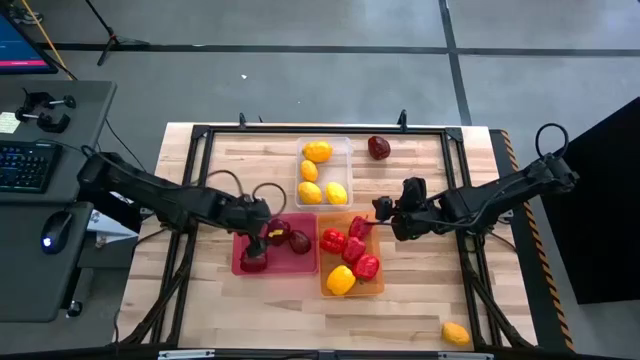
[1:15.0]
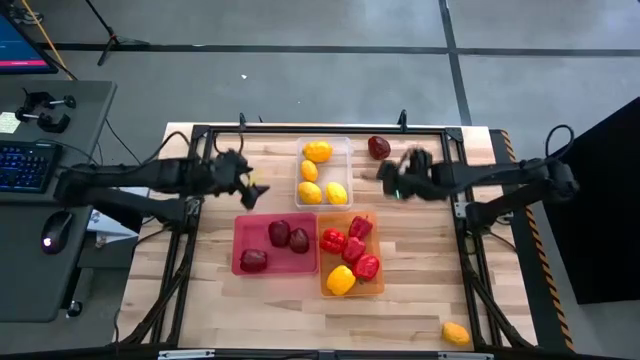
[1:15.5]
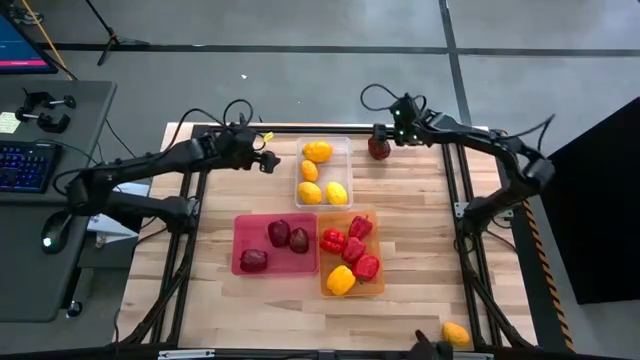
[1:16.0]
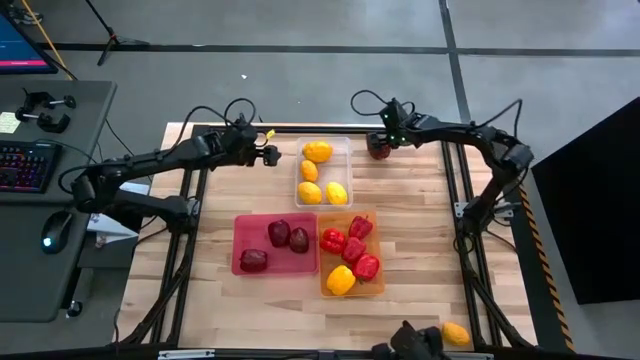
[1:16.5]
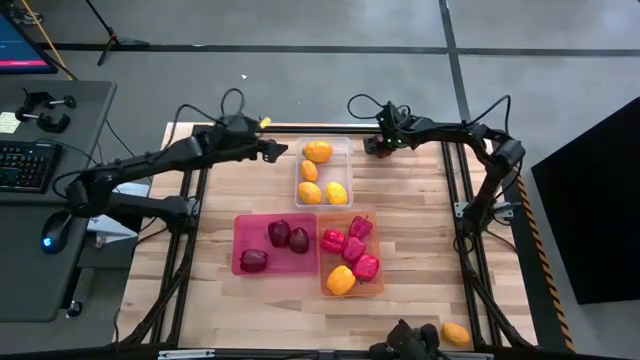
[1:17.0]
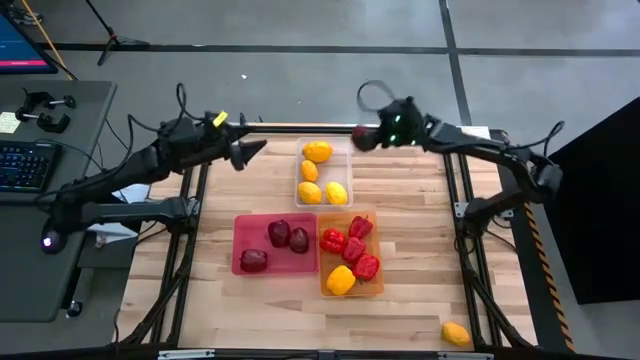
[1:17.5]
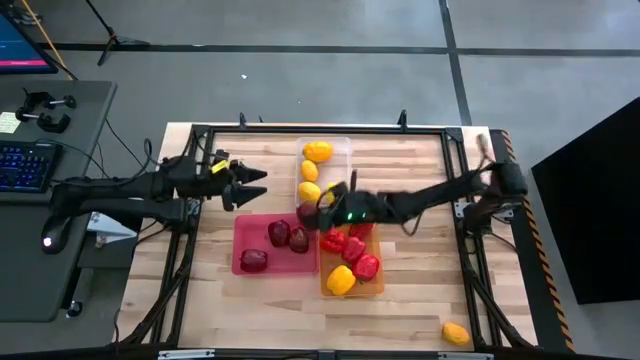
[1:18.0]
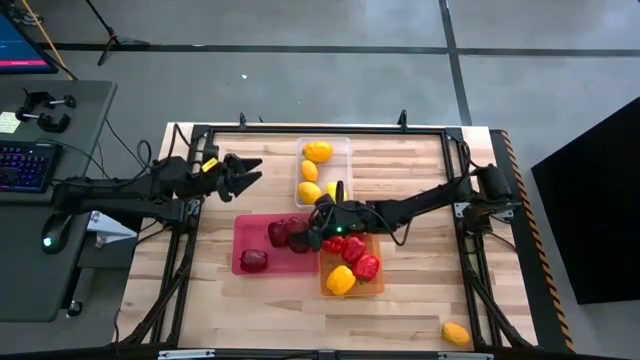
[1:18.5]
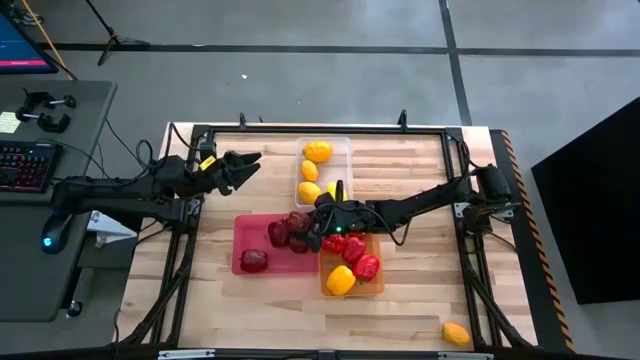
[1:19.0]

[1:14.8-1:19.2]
Task: Sort produce into baskets
Put the apple into the red bin

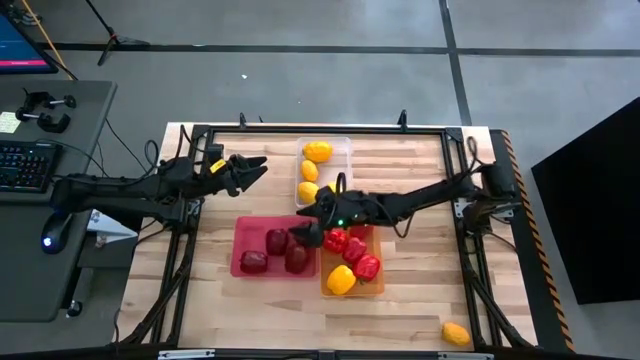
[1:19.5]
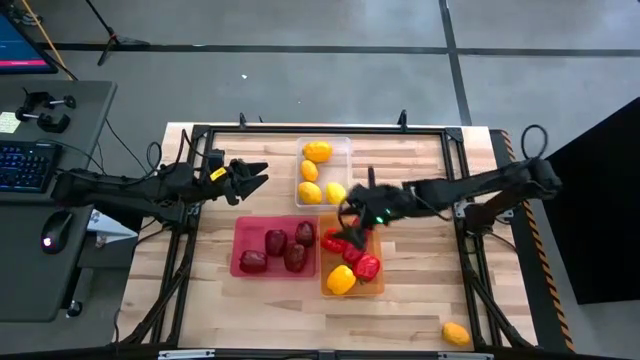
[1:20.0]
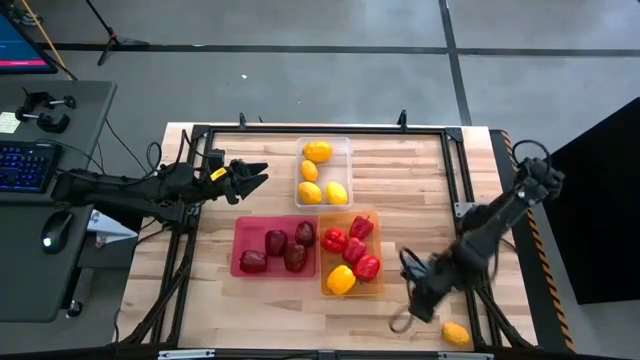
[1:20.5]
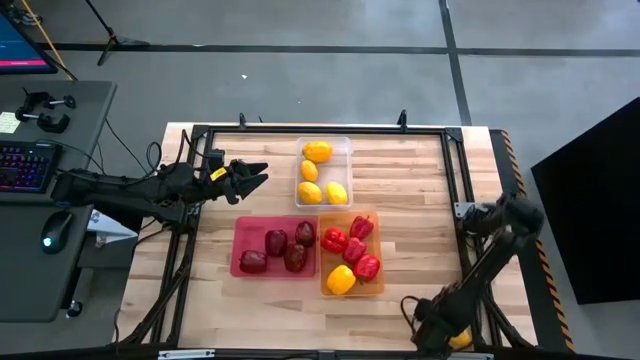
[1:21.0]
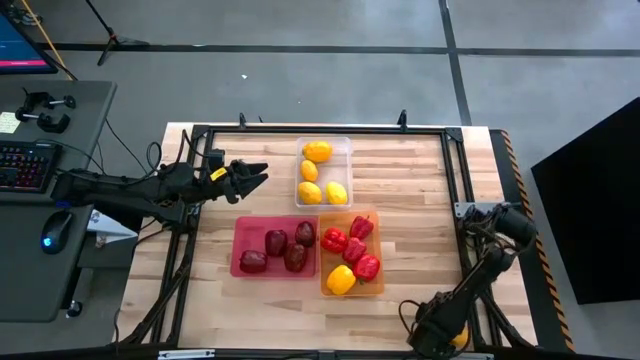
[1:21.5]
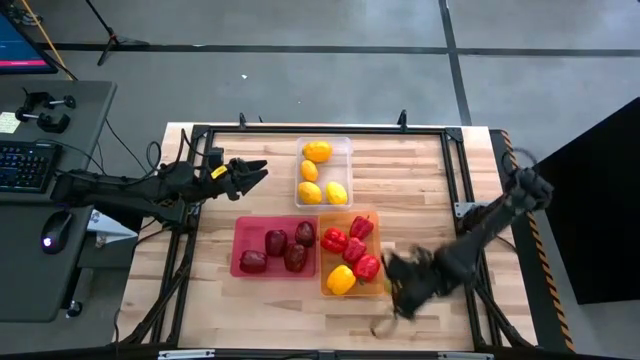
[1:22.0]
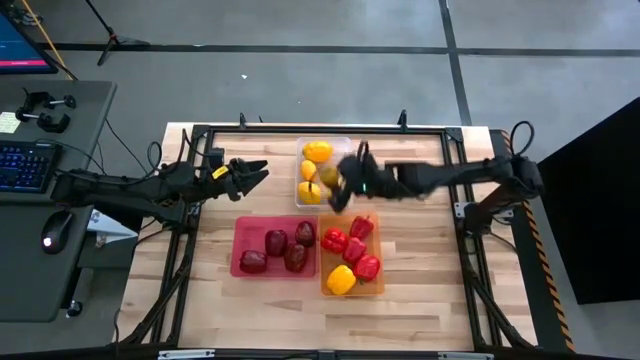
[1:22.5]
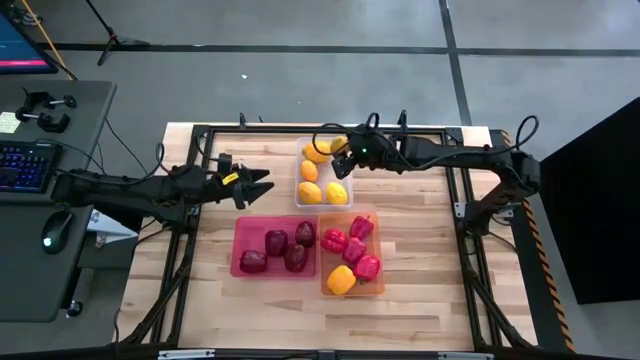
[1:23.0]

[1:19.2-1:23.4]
Put the lemon into the white bin

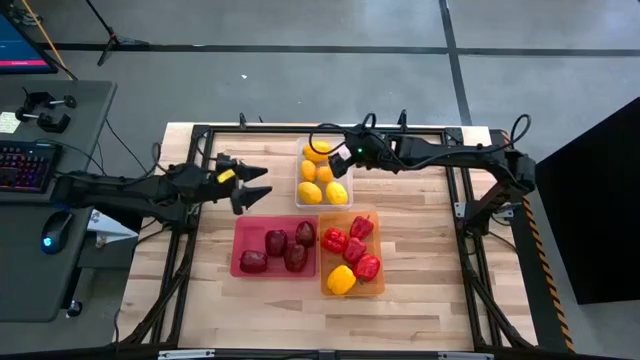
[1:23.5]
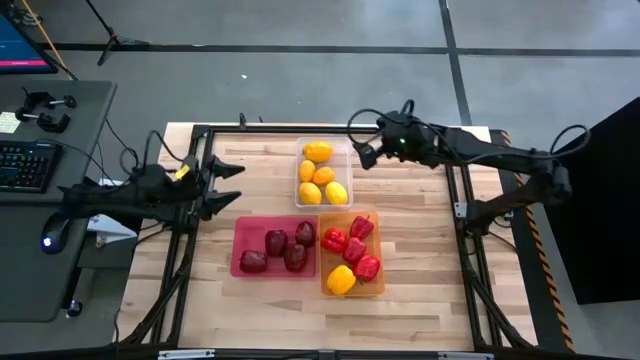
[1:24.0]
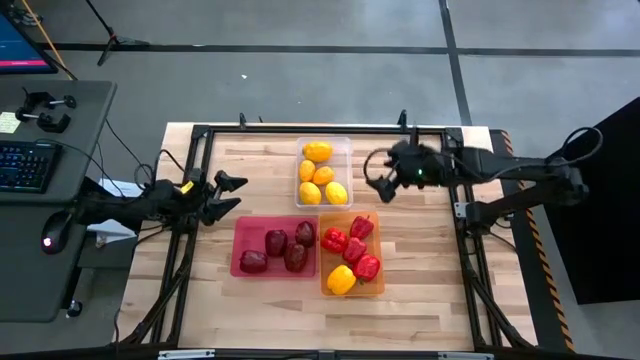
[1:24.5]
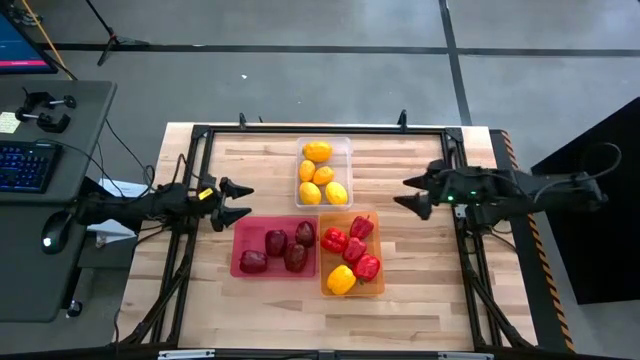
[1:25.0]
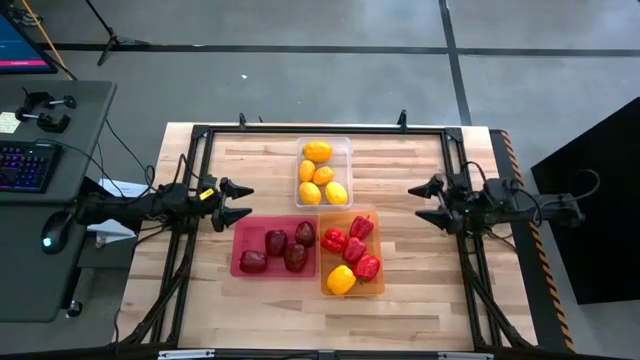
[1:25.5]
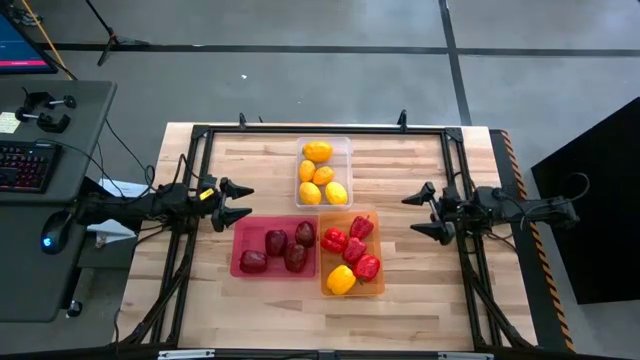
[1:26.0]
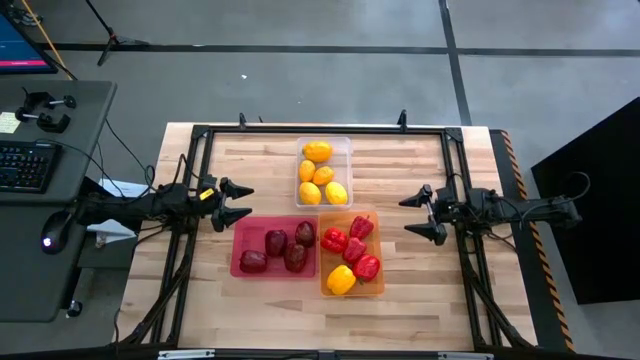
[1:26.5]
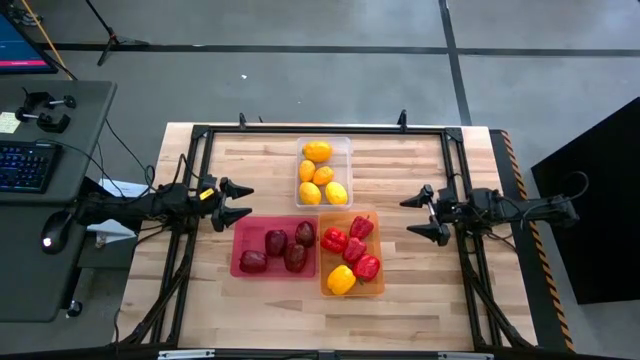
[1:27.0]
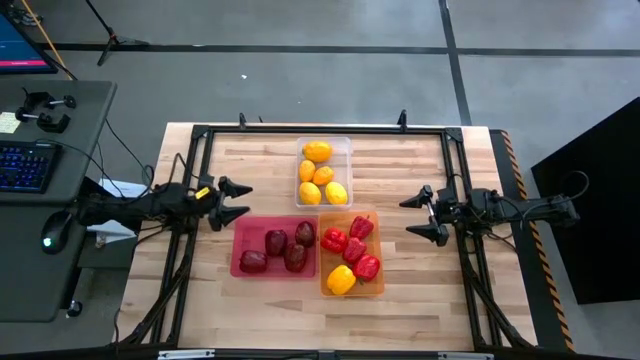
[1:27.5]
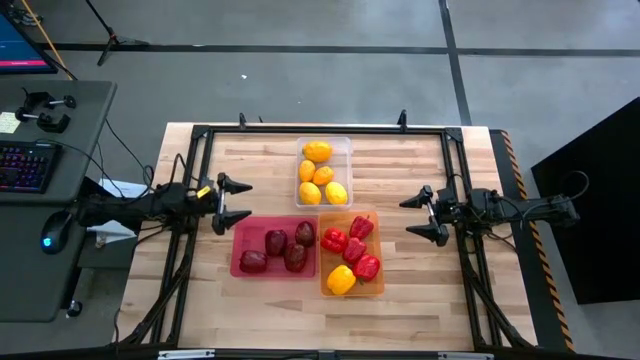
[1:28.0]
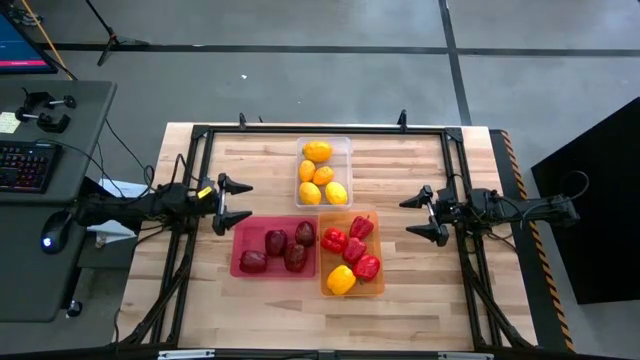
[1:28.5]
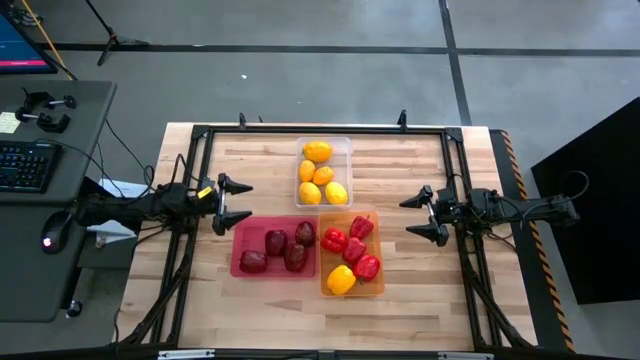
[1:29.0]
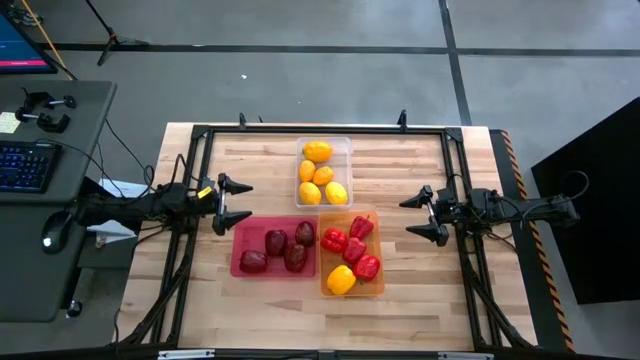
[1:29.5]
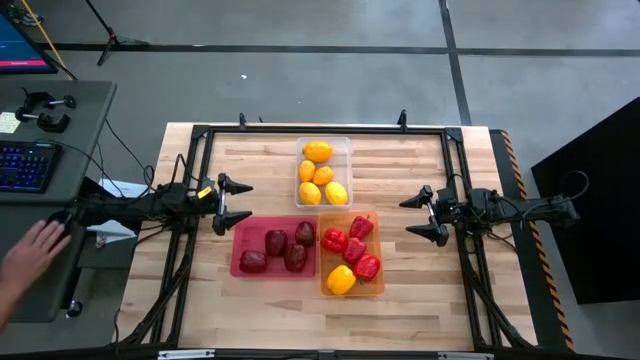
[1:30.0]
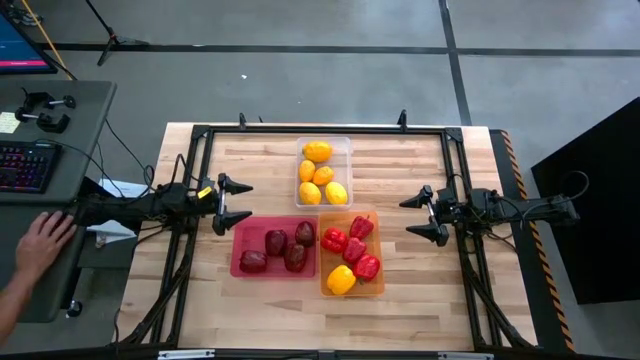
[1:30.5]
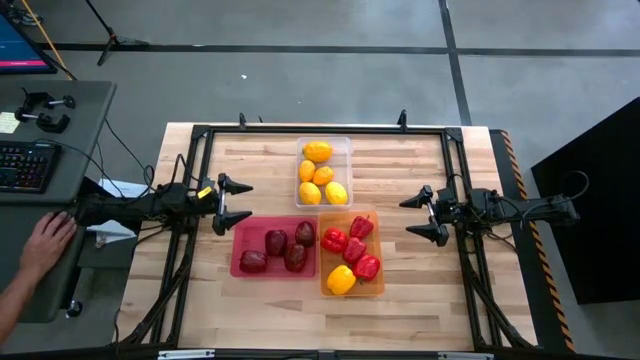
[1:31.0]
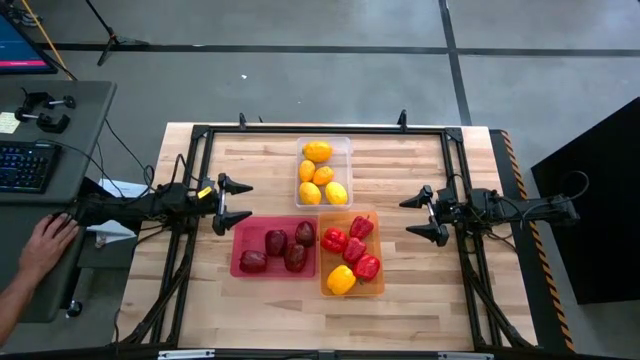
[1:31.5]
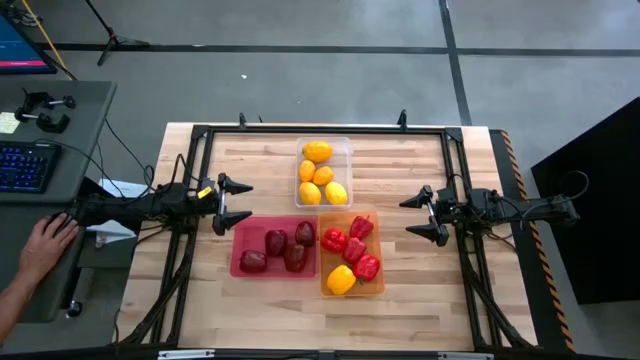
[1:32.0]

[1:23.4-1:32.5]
Return to Home Position

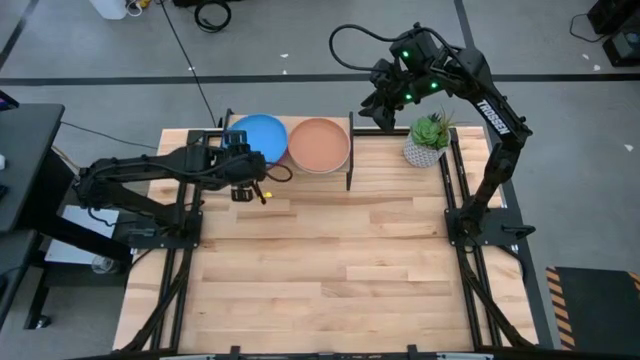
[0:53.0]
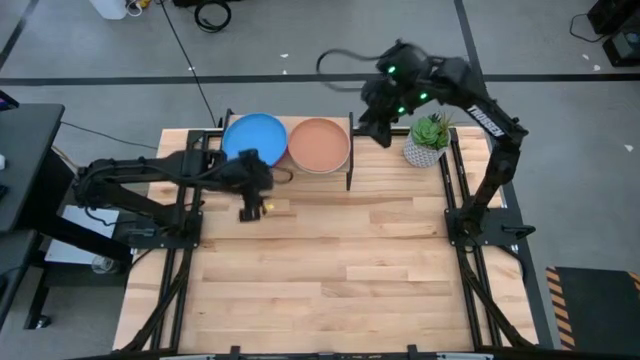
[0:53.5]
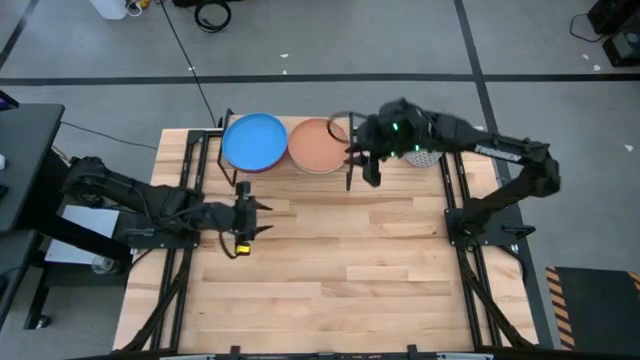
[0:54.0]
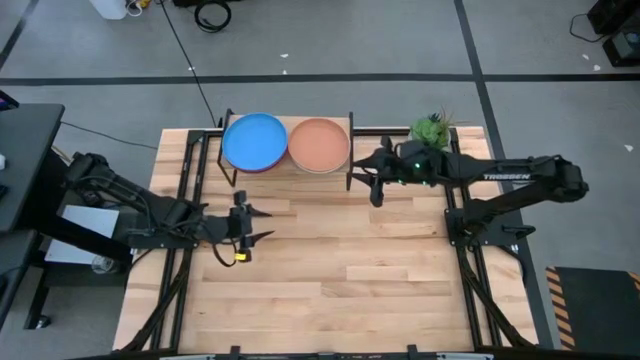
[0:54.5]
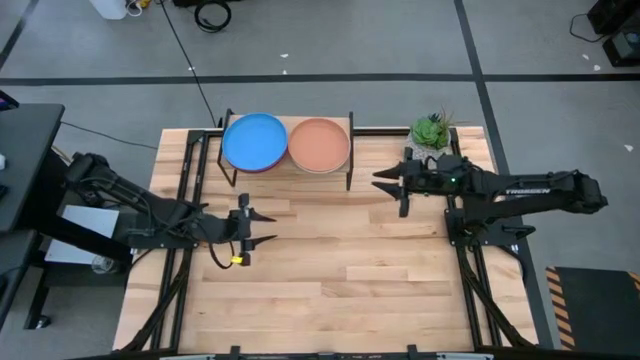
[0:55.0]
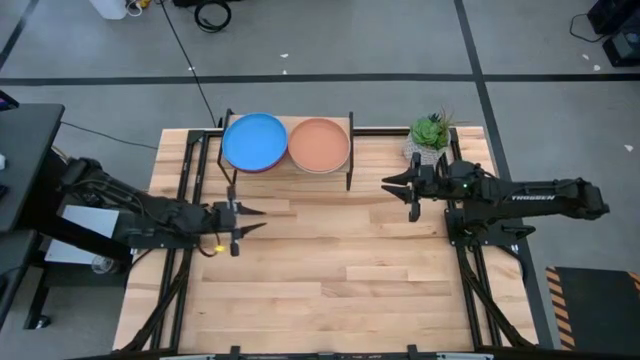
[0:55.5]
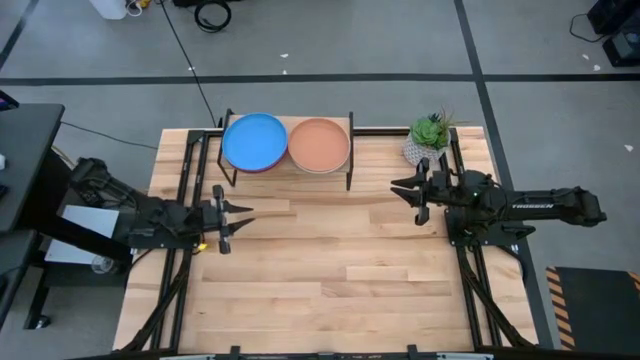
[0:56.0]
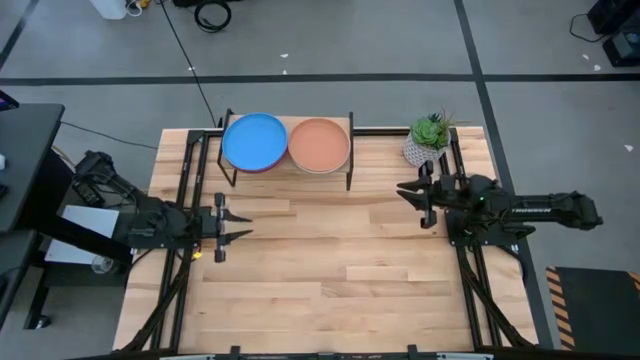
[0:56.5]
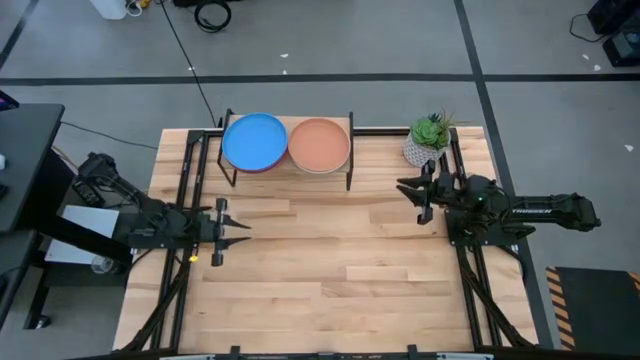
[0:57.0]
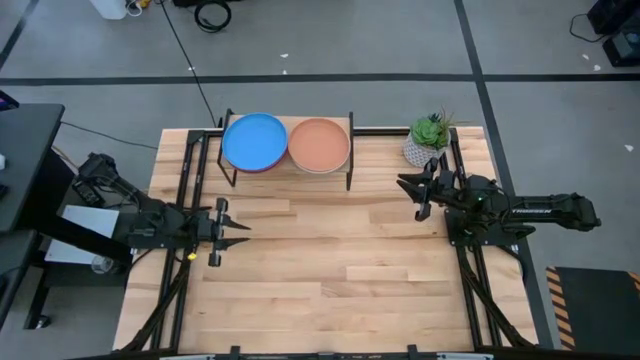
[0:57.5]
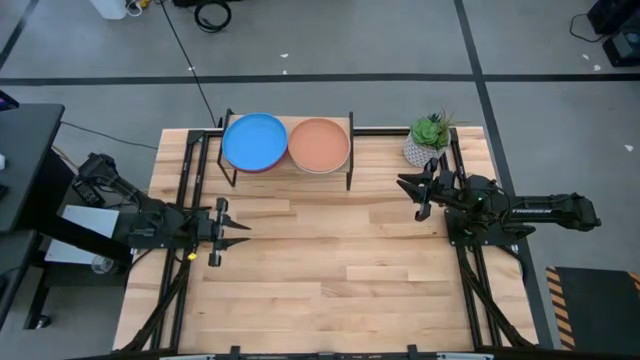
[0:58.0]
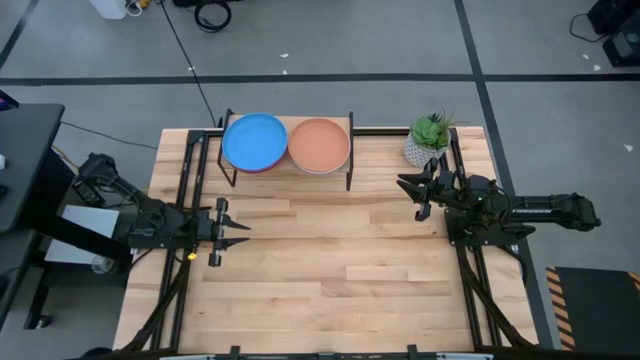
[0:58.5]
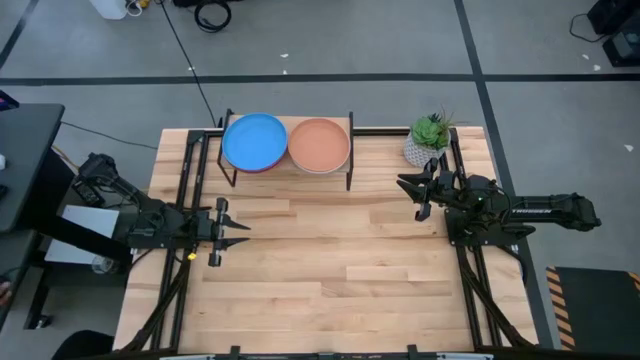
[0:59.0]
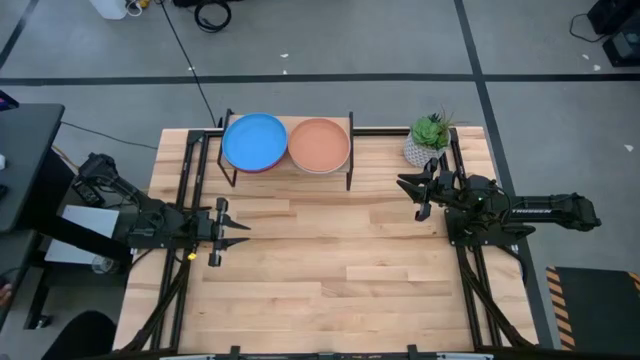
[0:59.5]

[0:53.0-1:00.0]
Task: Place and stack plates onto a shelf
Return to Home Position
